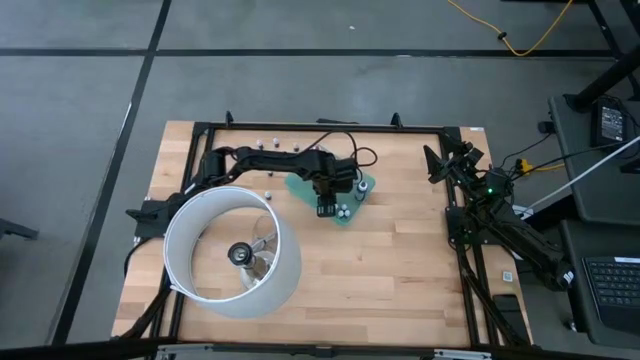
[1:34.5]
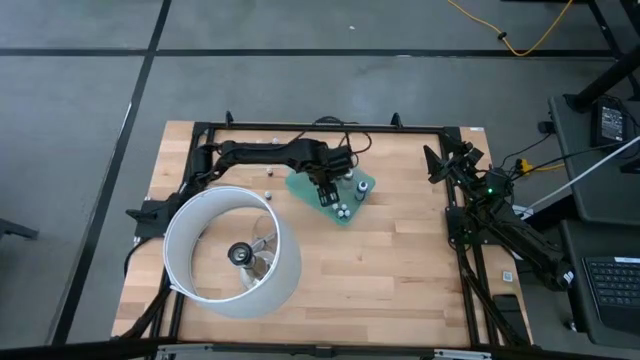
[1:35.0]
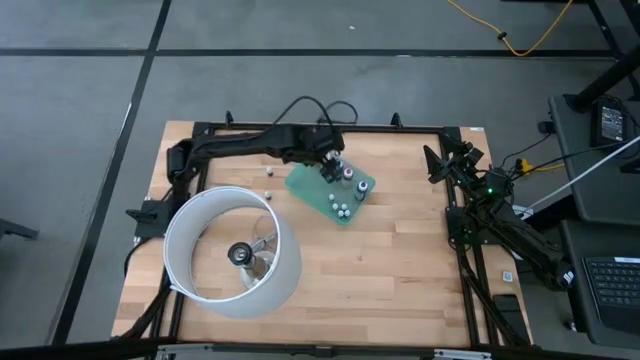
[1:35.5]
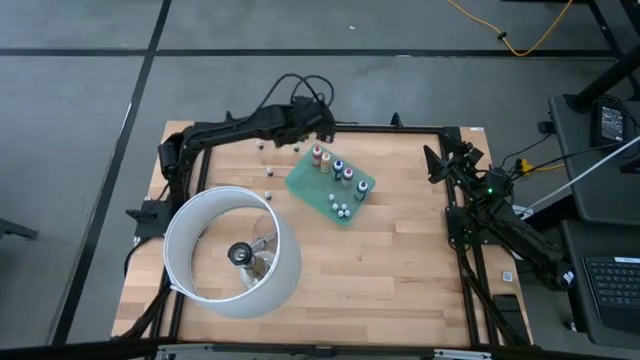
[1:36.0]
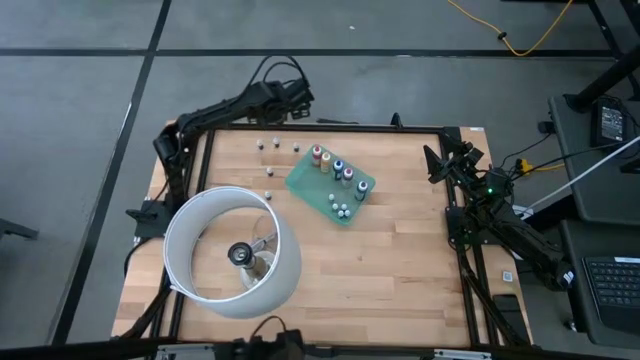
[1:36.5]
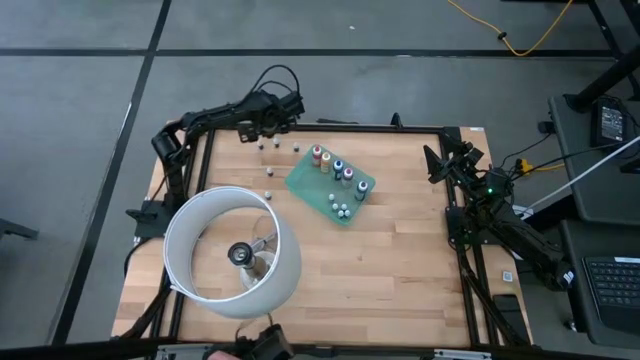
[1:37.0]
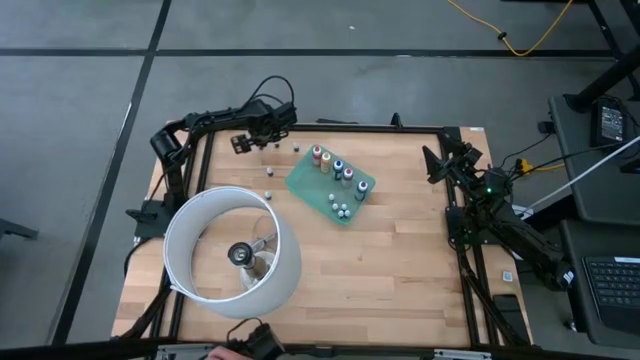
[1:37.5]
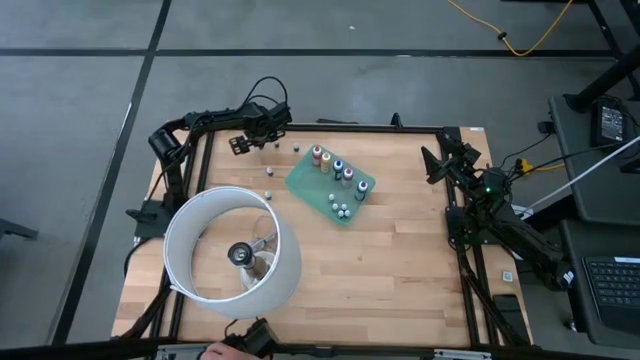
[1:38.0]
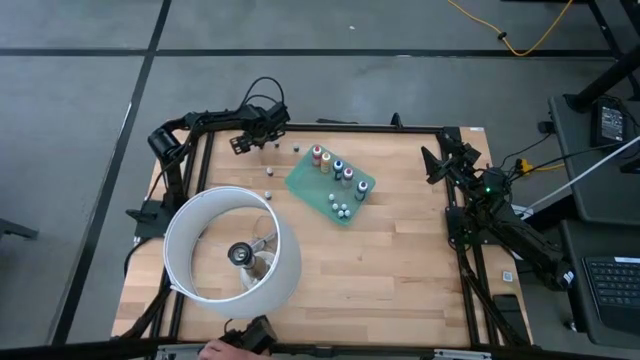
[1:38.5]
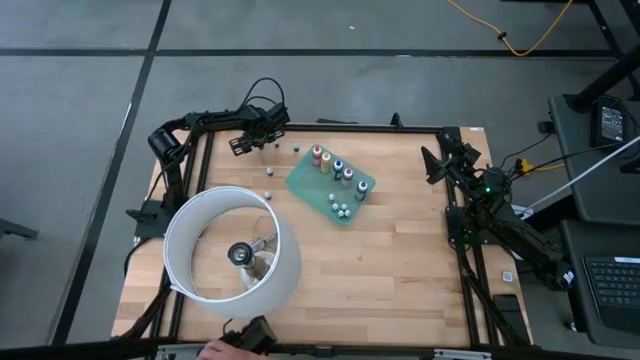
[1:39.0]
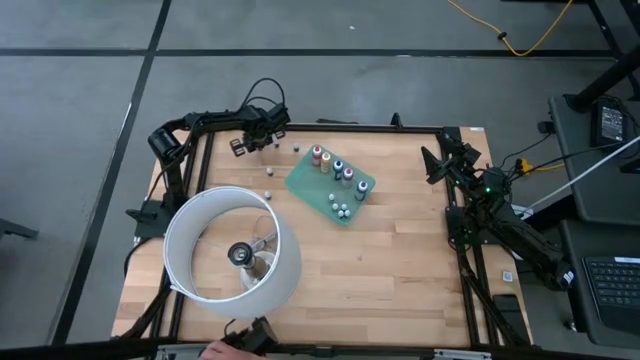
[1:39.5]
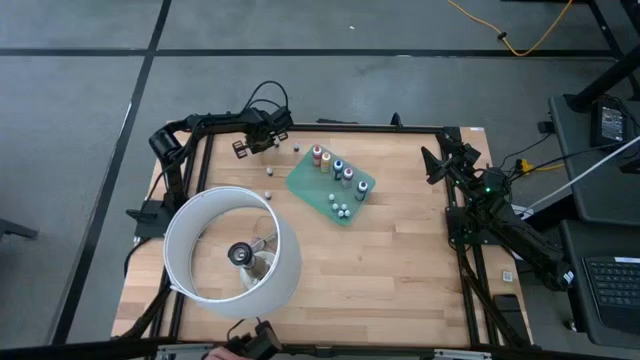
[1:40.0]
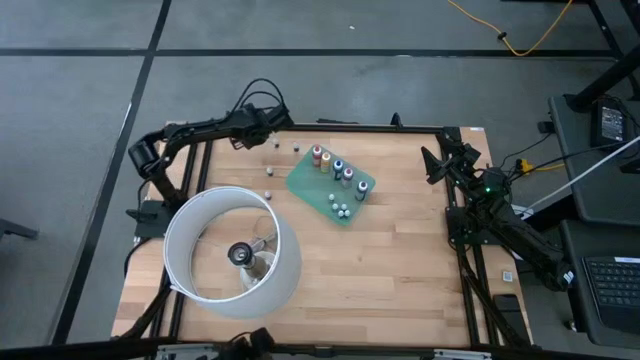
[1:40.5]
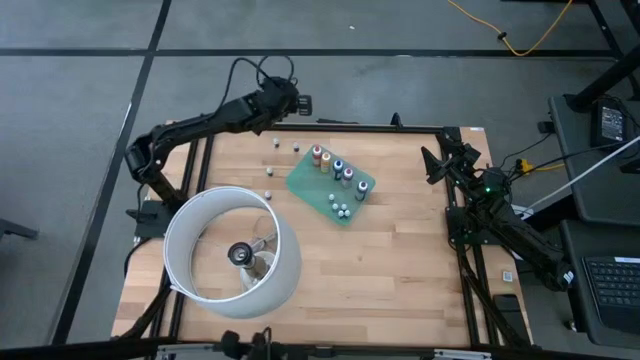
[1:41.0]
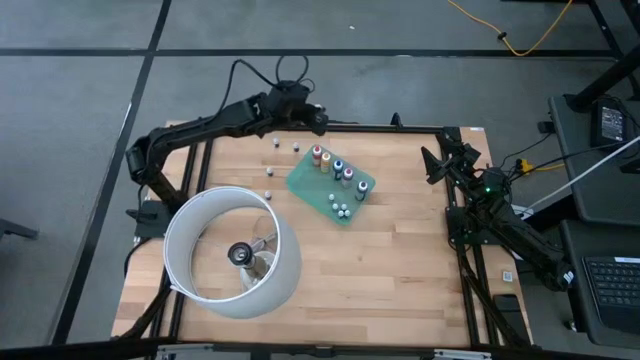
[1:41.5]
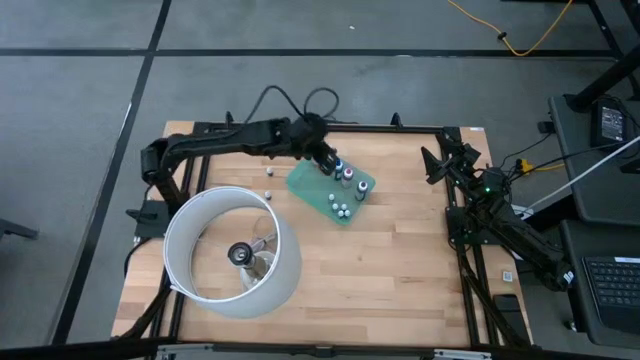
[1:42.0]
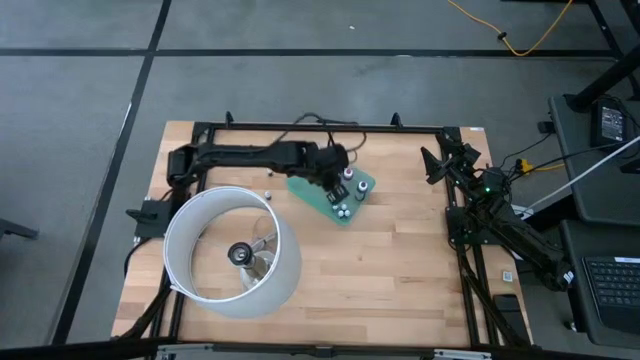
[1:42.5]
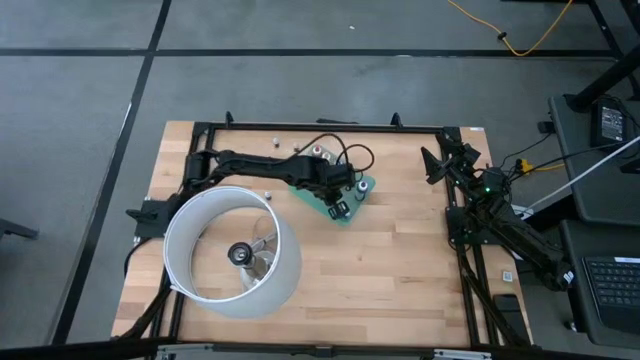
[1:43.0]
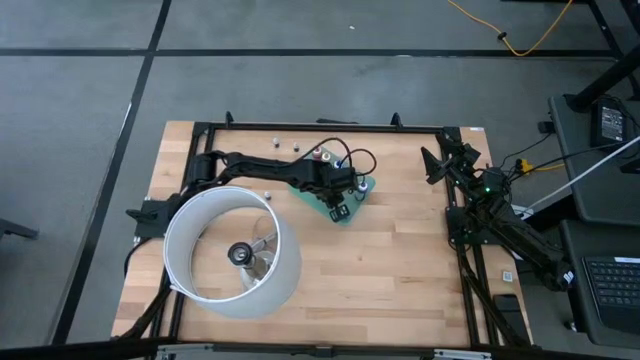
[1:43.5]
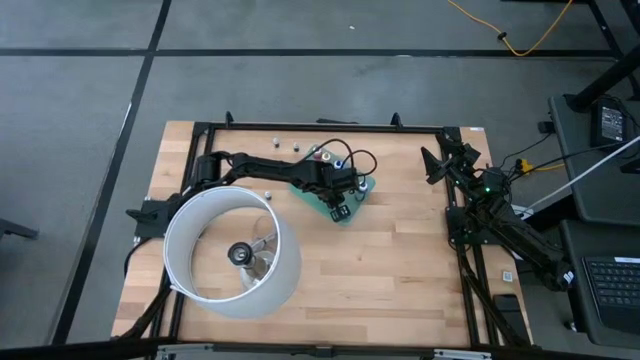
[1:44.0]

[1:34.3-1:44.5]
Task: Pick & Place food coloring
Put the small red food coloring bottle into the green bin

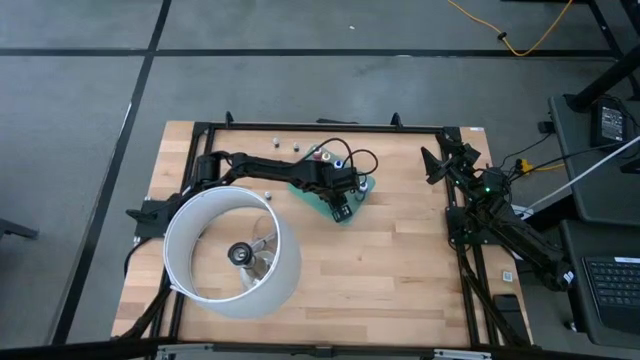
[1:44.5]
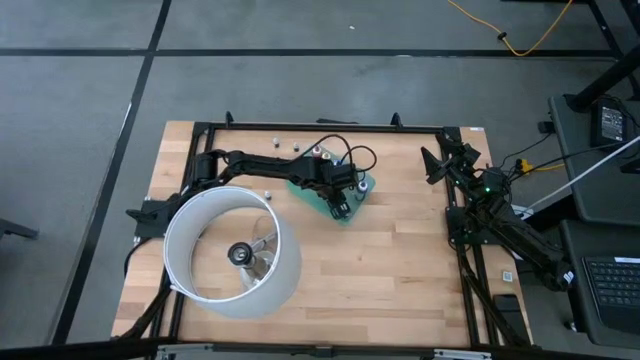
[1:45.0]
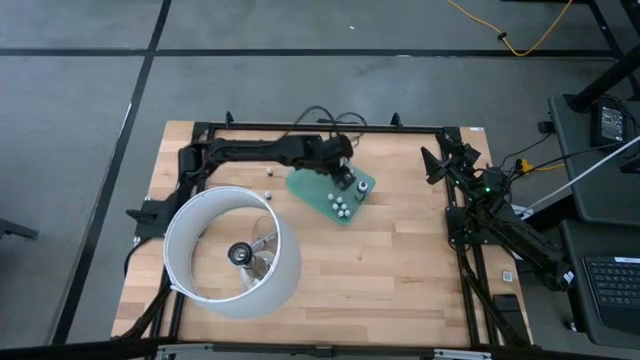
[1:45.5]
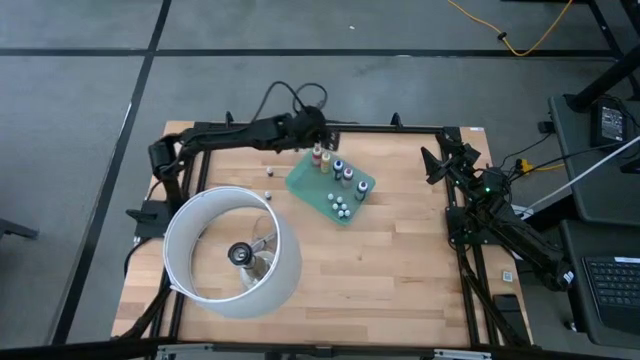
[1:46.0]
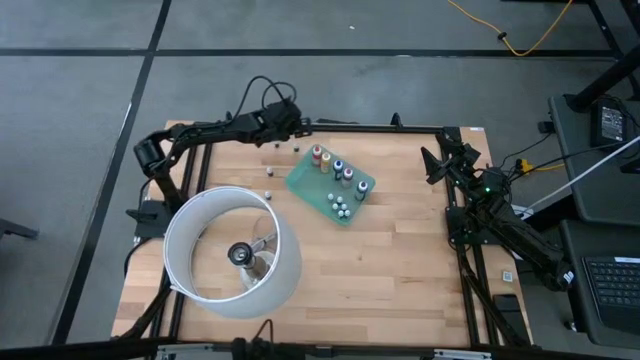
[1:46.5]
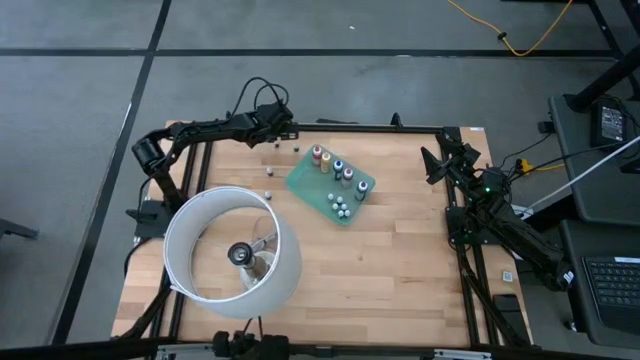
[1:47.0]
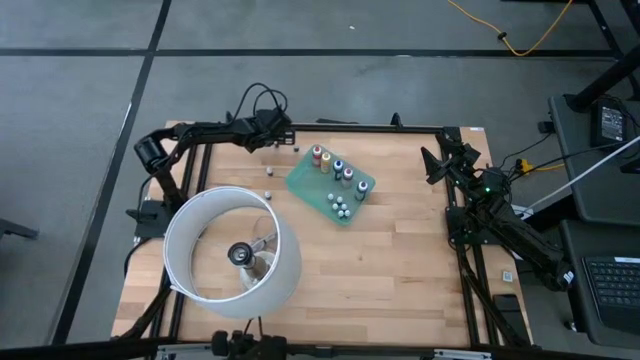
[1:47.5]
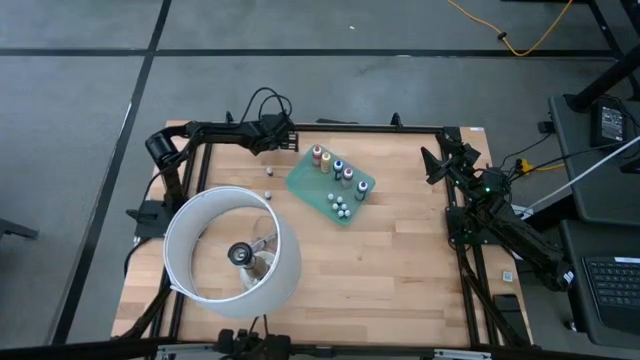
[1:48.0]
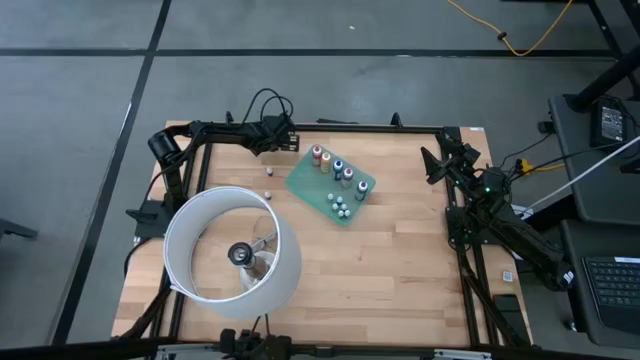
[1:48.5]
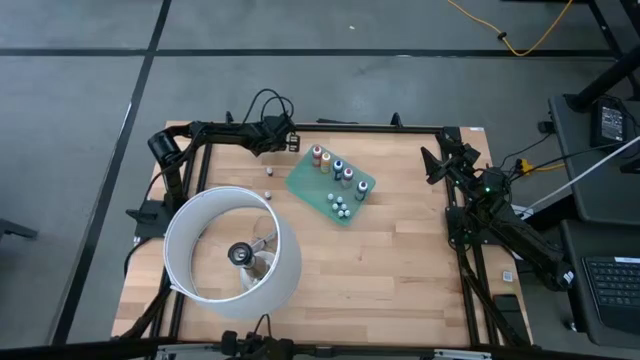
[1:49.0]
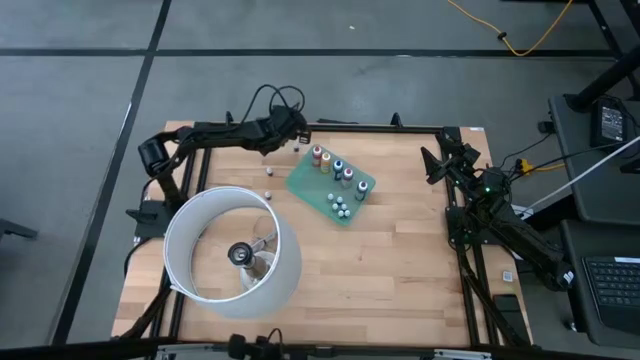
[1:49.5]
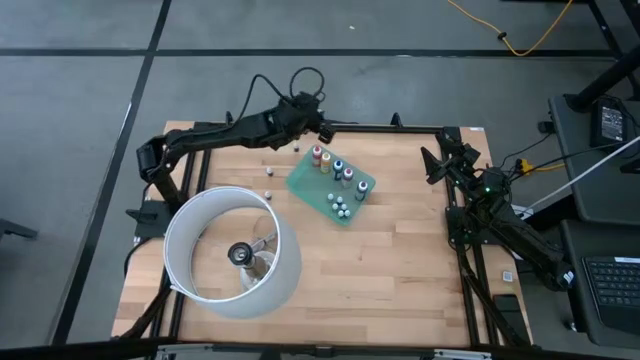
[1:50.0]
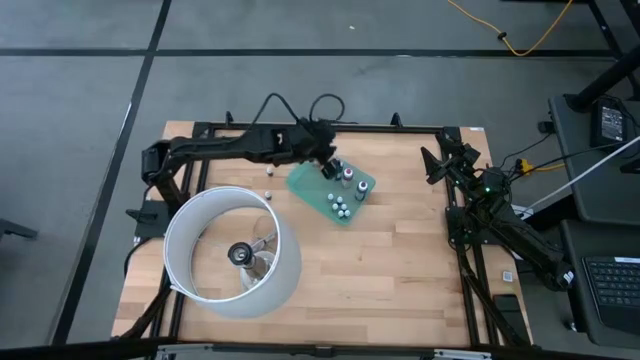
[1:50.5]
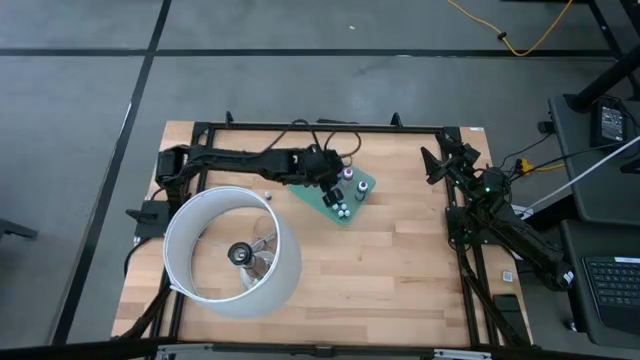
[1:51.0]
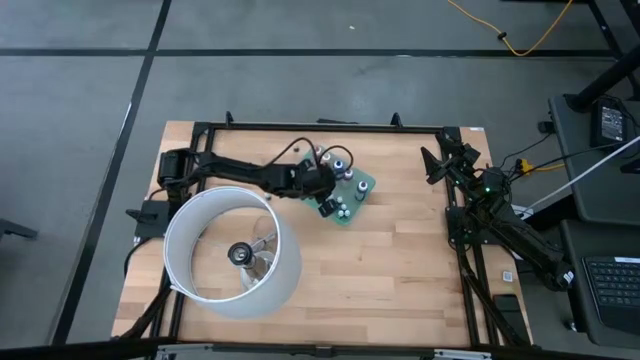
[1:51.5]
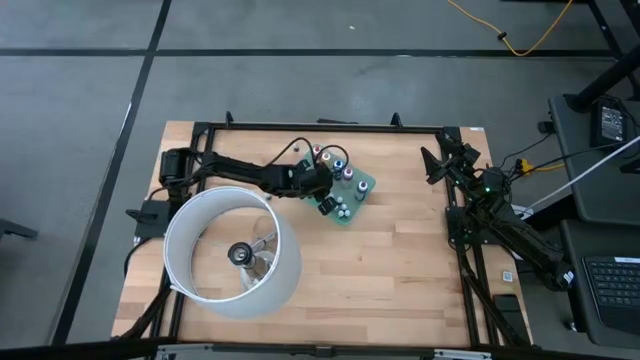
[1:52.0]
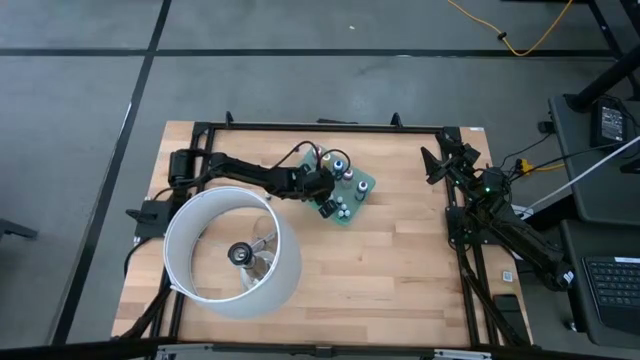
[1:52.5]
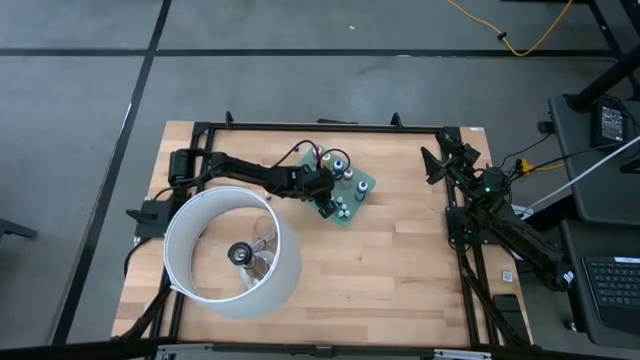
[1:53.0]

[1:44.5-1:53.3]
Put the small blue food coloring bottle into the green bin

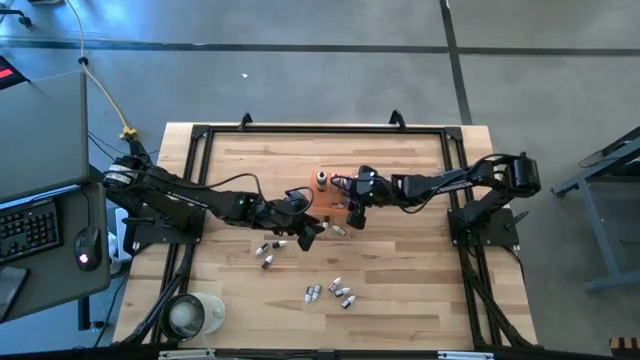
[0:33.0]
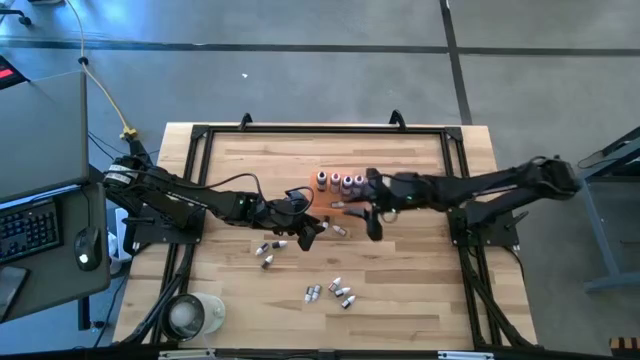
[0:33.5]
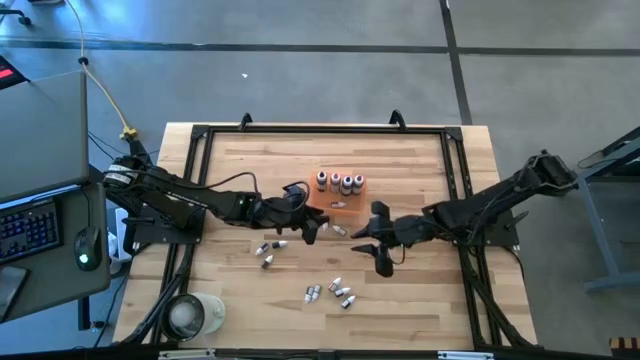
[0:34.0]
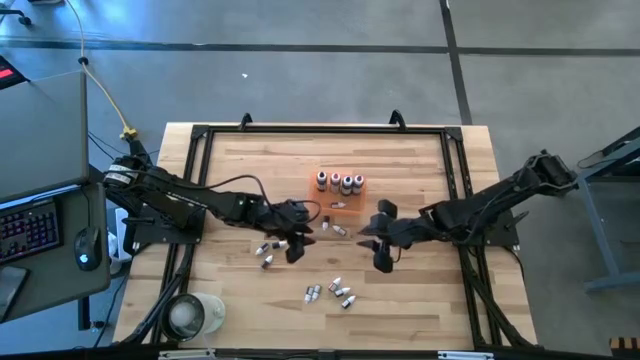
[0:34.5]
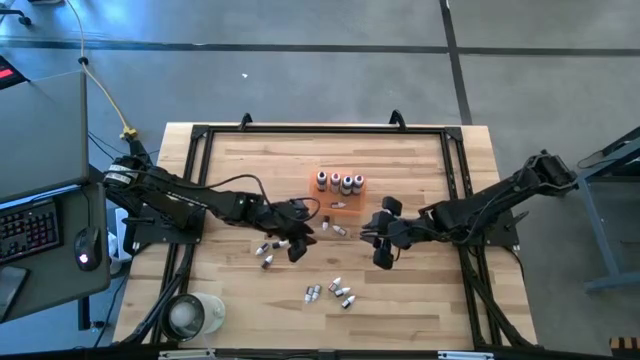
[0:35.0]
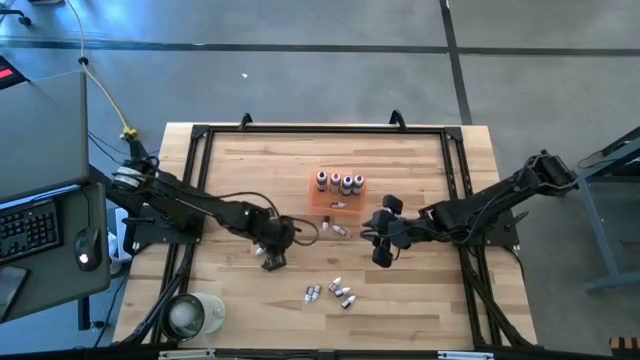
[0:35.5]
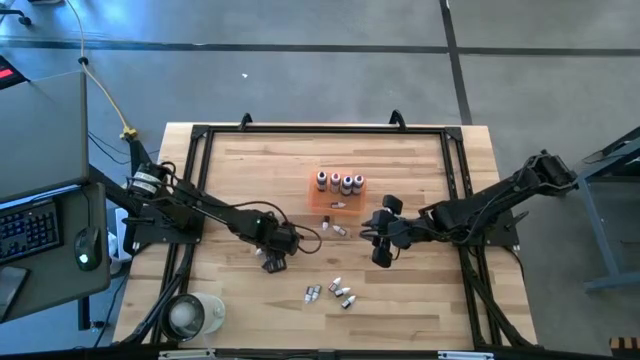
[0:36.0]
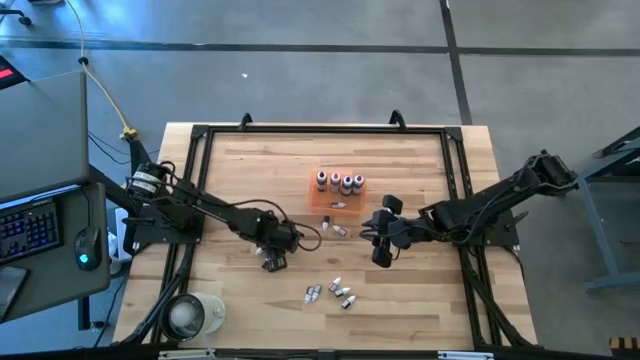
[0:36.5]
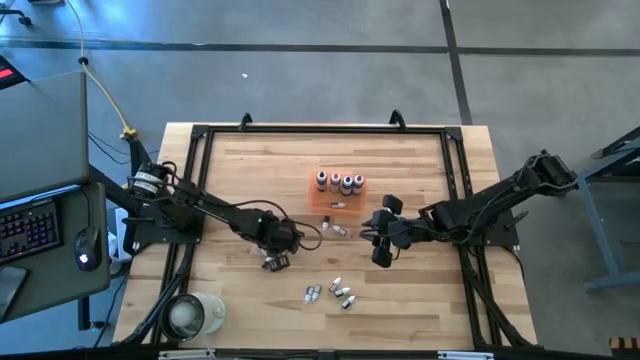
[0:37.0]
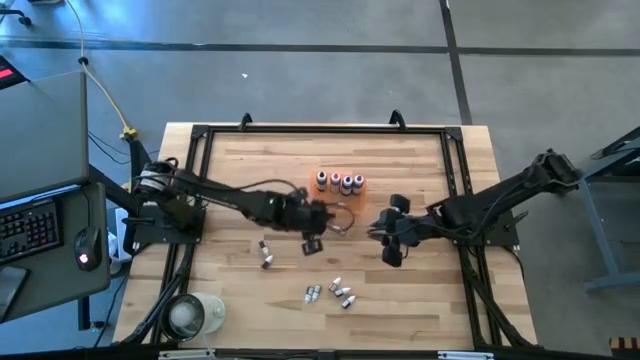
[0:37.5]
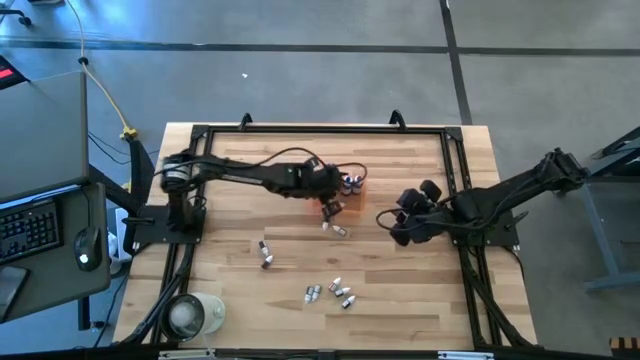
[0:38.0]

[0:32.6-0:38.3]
Task: Pick & Place food coloring
Put the top small green food coloring bottle into the orange bin
